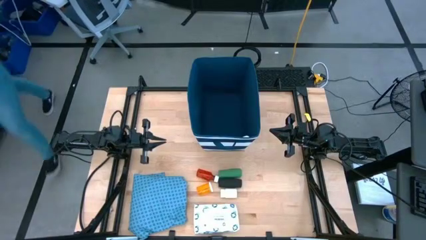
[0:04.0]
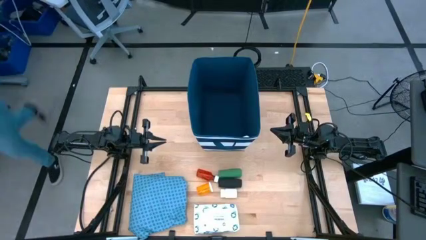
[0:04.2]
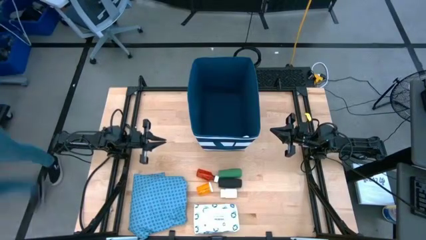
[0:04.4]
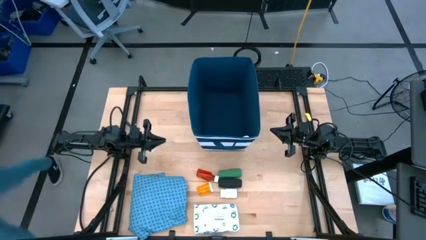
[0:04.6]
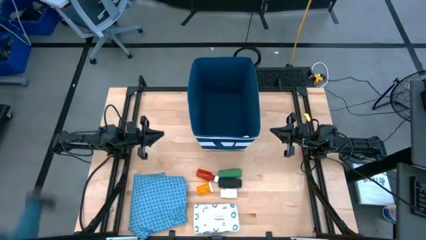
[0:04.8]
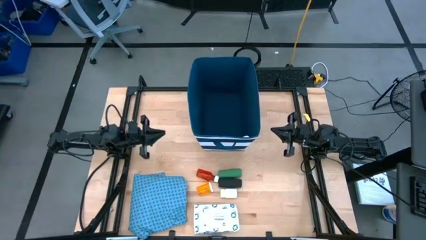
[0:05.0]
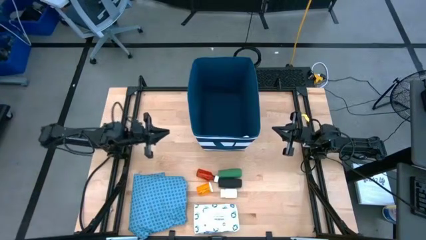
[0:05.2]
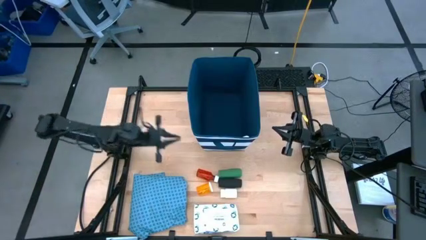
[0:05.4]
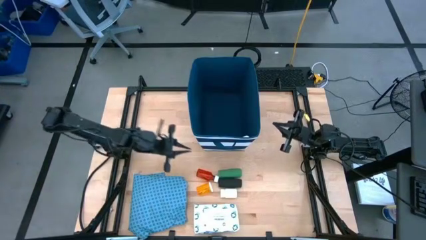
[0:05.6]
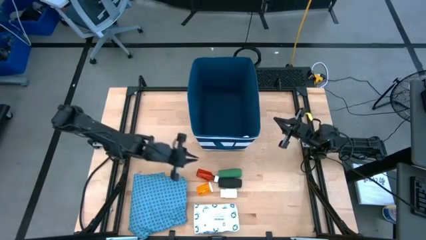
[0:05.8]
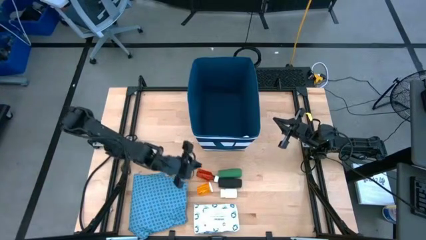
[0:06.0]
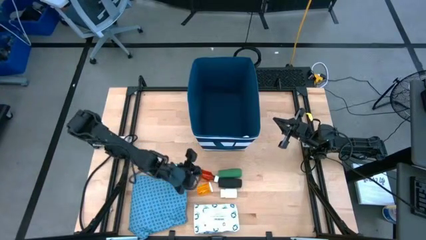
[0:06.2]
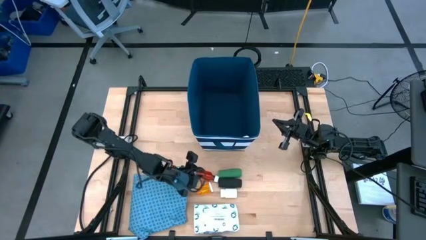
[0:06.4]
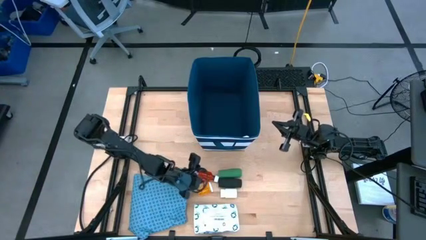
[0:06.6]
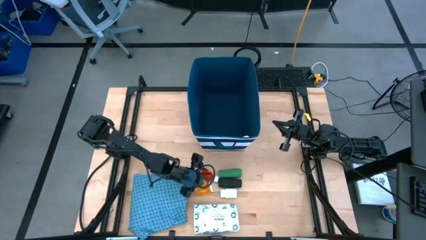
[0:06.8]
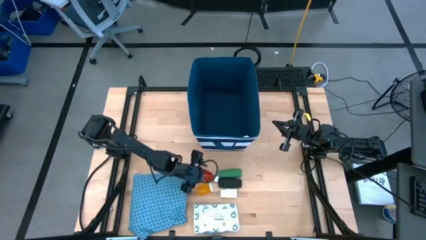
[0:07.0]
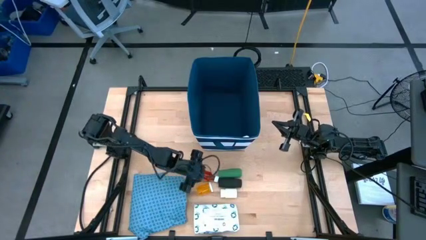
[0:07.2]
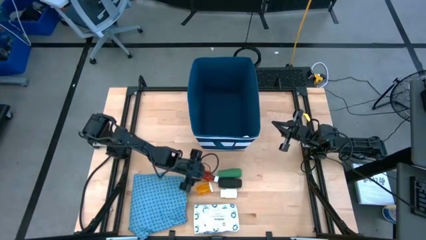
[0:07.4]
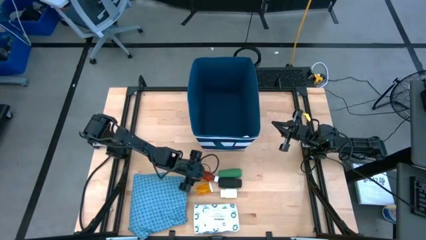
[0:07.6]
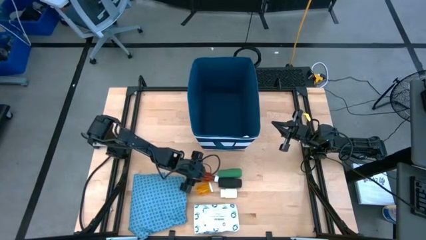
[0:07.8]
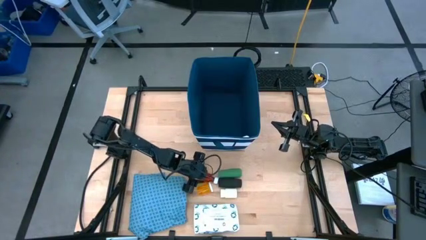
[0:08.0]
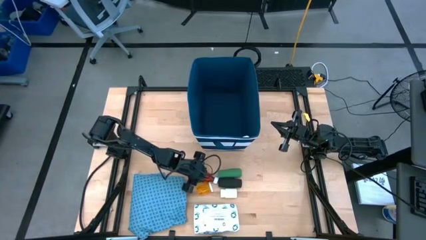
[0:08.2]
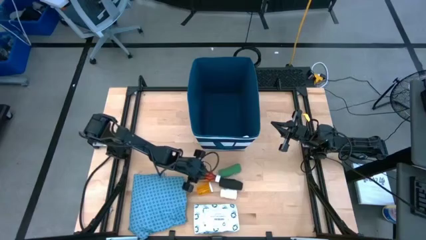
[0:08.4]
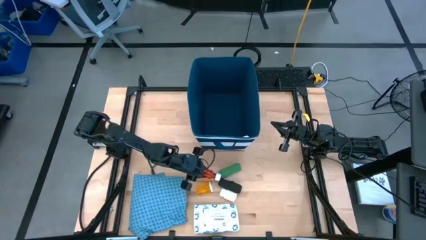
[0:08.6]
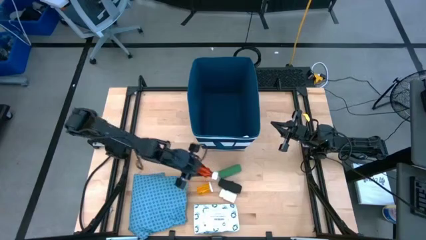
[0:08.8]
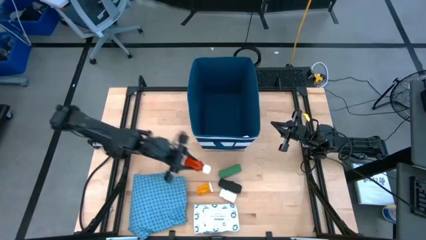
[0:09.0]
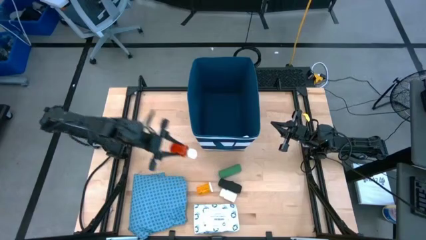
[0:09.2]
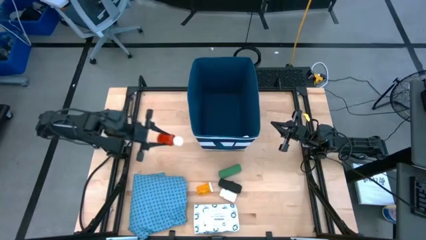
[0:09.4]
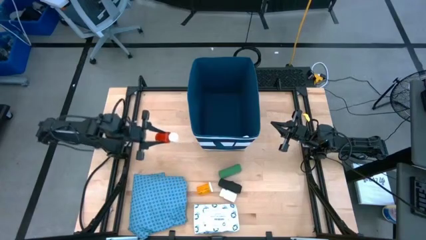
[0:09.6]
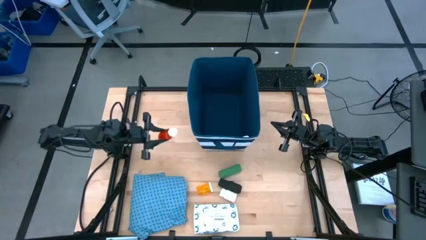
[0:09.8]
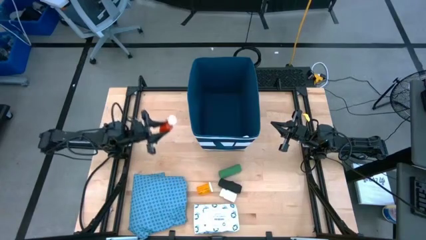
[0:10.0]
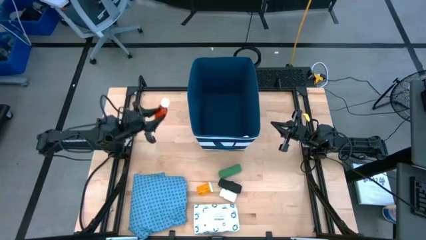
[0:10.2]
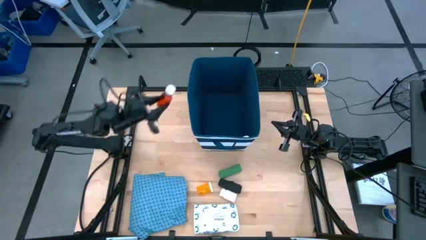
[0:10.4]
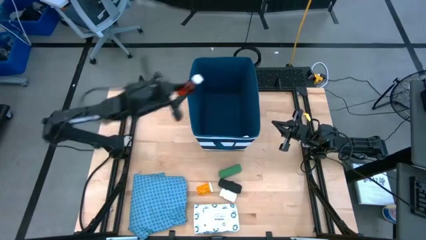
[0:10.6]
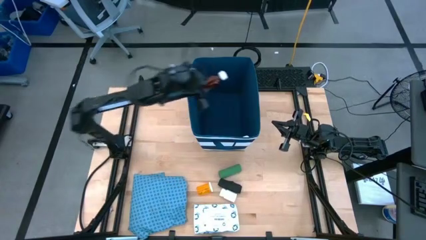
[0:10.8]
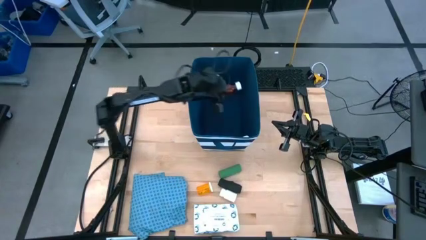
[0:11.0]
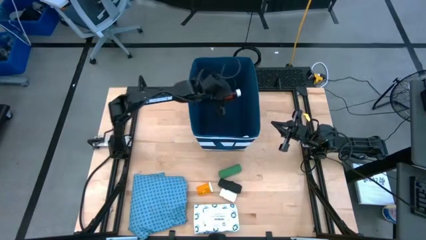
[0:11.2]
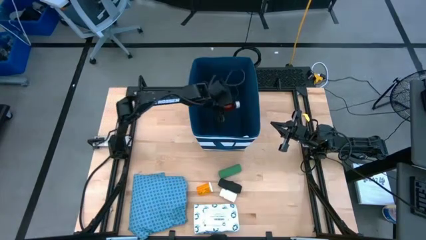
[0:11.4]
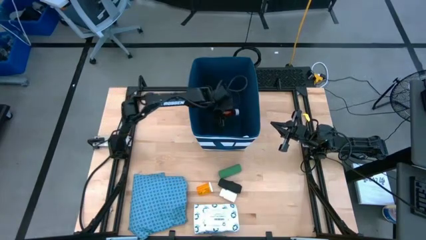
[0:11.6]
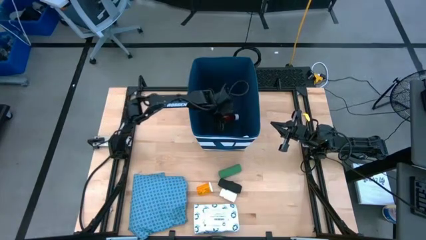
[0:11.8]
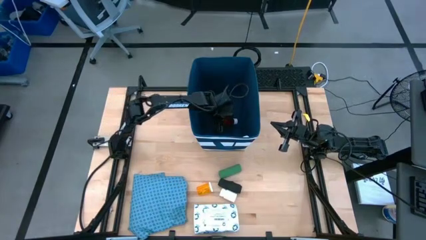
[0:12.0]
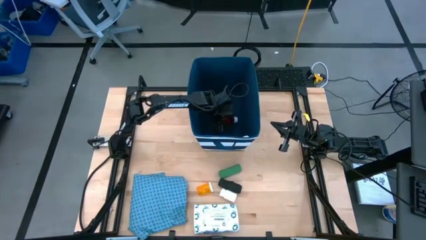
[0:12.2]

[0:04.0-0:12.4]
Task: Pick & place medical supplies in basket/bin
Put the brown bottle into the basket

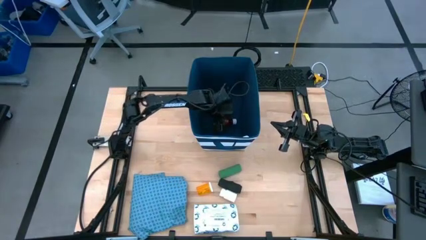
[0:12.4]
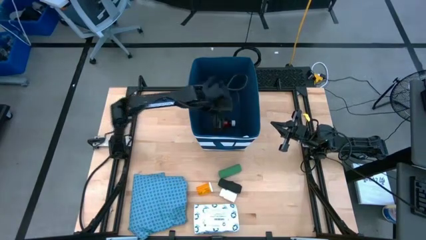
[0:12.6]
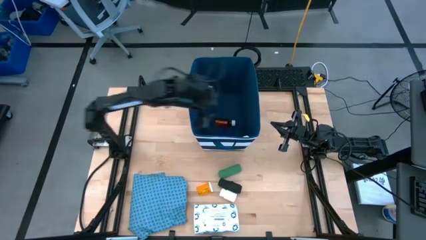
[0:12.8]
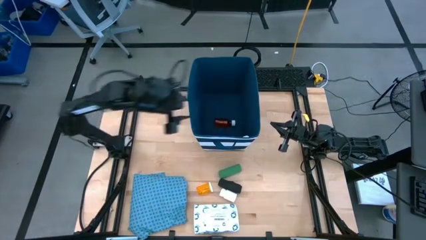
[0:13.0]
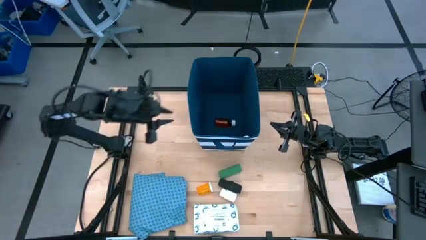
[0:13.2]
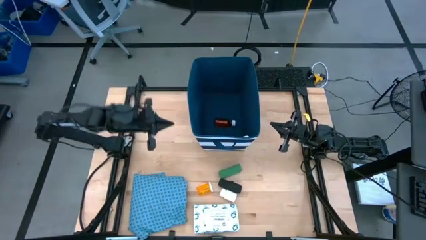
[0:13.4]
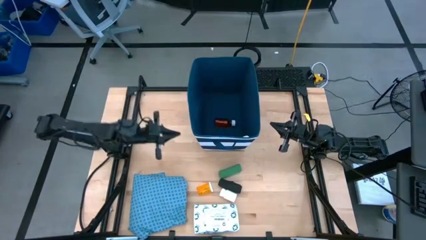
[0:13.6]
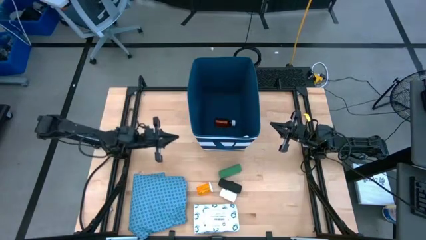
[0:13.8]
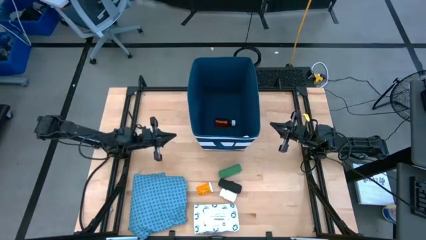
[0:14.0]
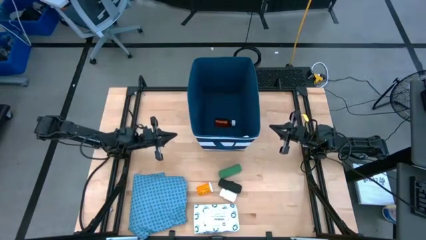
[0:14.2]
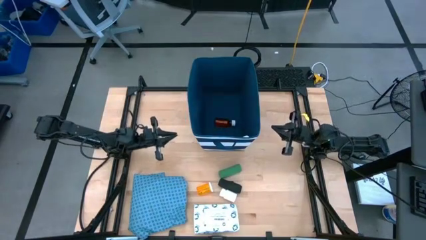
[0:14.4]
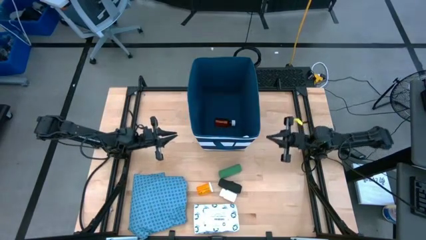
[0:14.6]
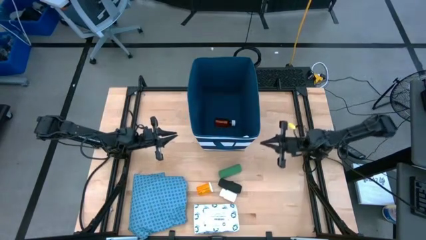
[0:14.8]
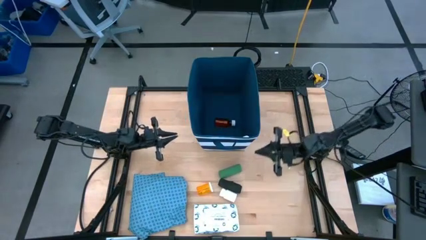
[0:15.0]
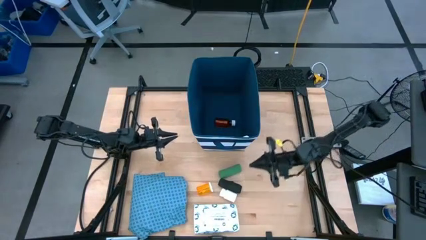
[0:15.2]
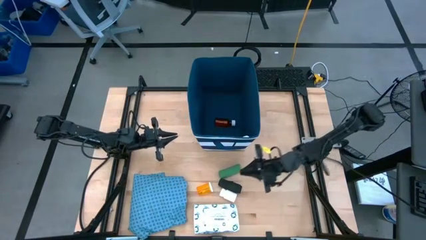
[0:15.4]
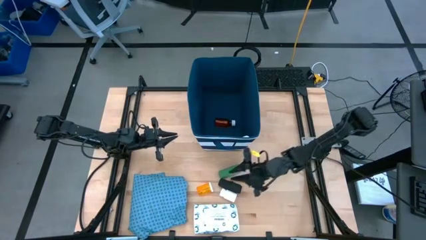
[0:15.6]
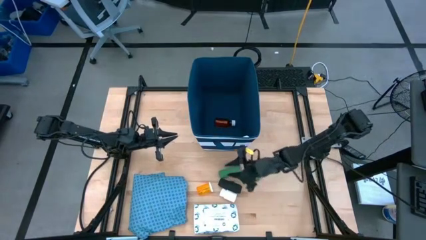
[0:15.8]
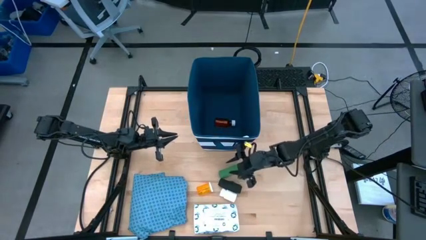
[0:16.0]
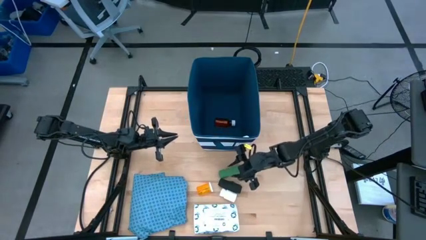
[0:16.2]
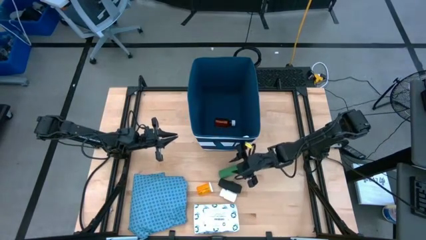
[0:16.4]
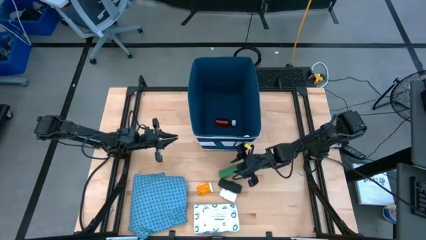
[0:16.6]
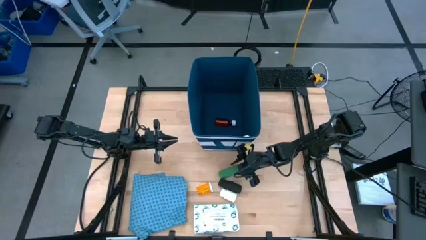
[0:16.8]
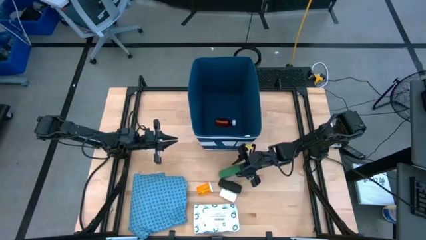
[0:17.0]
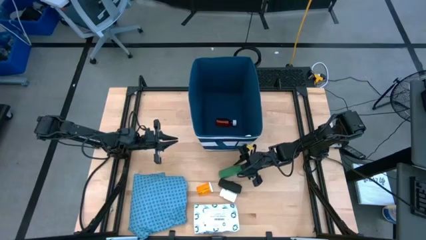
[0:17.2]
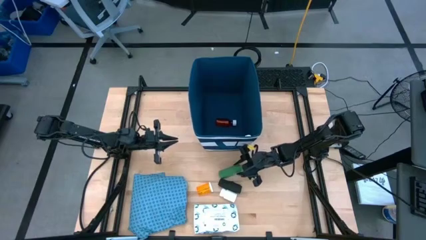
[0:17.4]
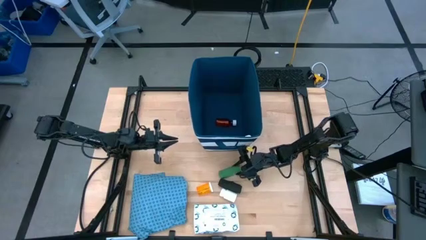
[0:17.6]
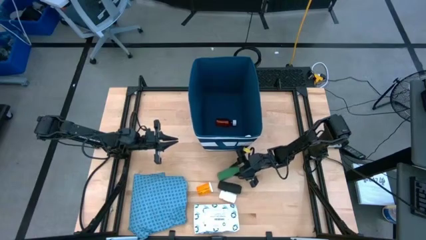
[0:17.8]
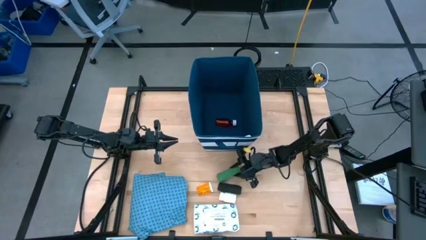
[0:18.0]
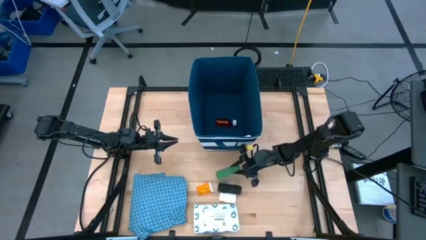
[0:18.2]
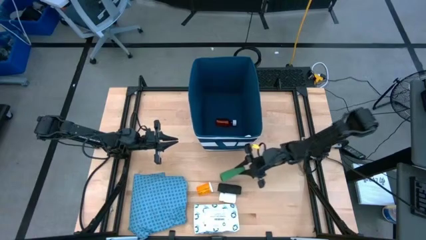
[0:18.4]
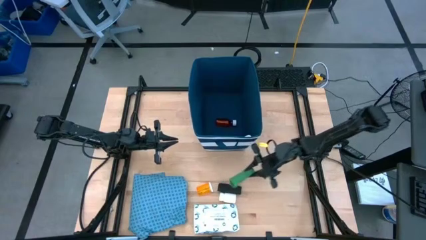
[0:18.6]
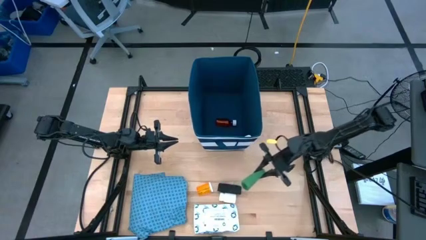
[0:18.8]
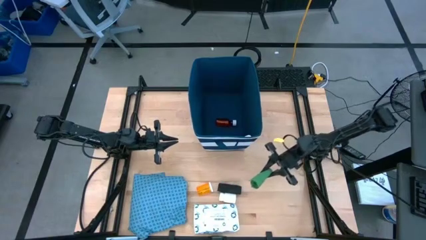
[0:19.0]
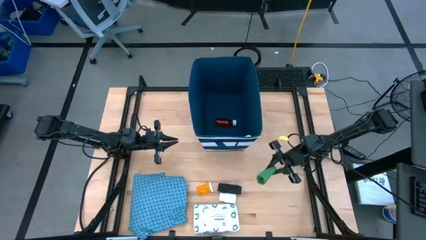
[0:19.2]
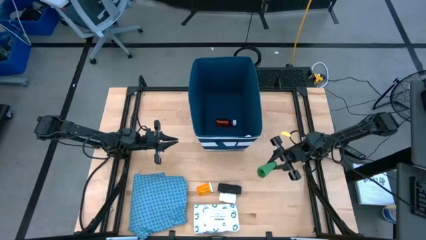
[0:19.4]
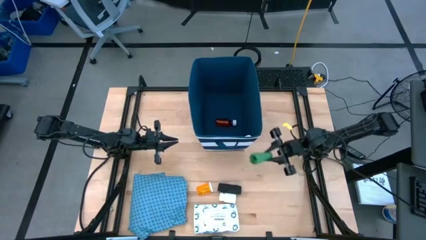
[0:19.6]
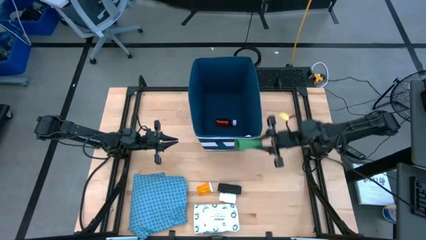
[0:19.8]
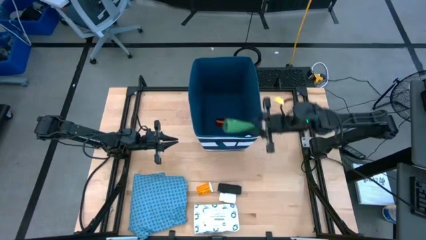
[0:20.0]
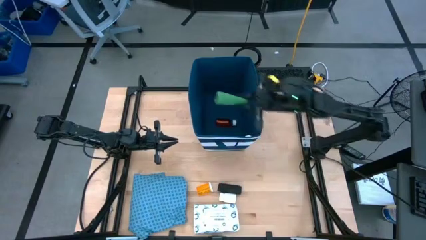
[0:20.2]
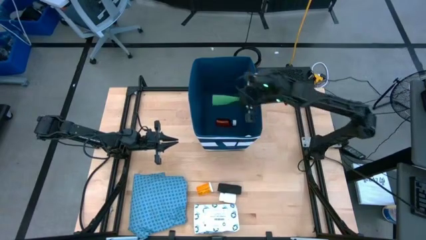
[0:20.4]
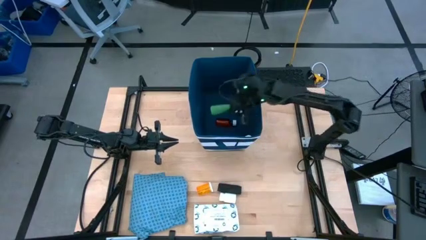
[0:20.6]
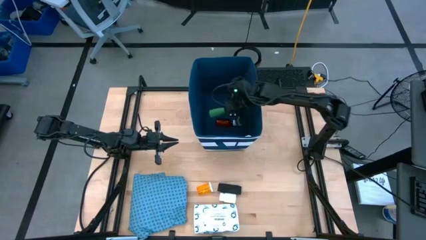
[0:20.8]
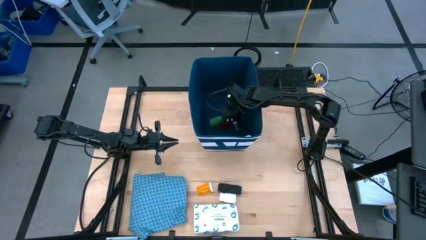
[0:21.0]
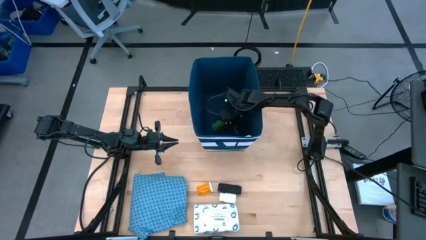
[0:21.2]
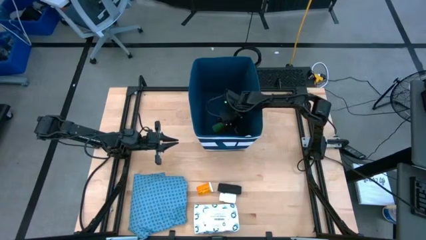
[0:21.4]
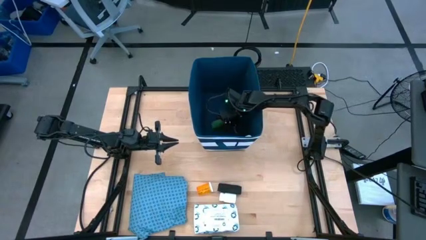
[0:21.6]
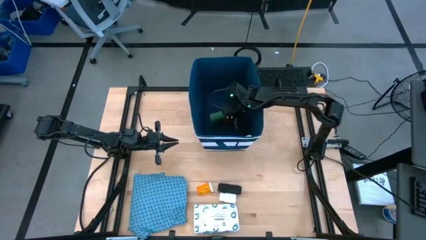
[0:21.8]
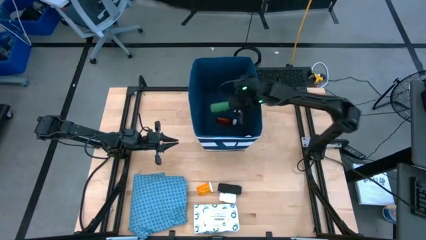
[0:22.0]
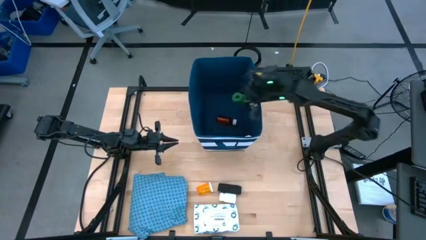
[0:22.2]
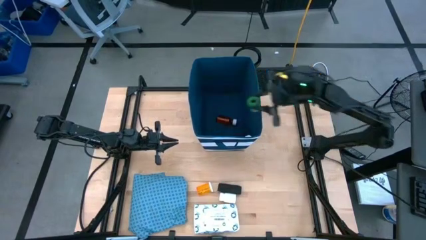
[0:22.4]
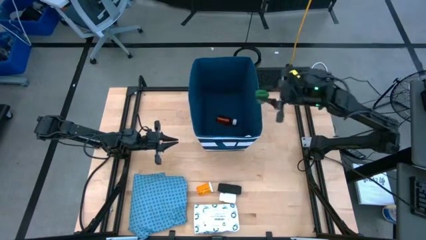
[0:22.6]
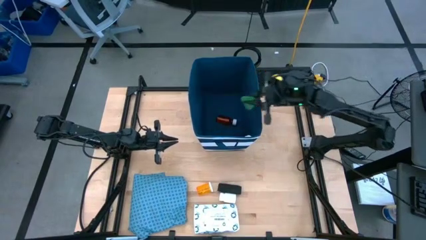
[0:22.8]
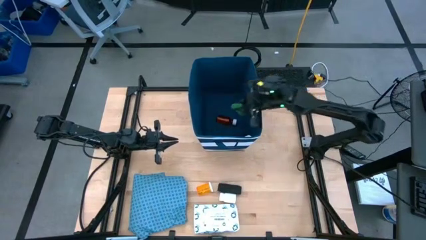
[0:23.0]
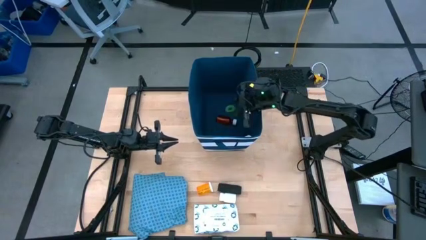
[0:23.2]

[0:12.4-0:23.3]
Put the green bandage into the basket
